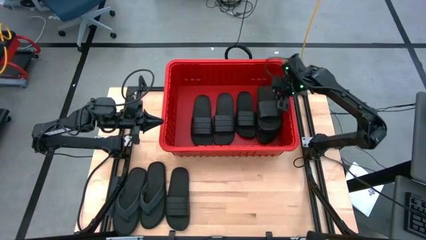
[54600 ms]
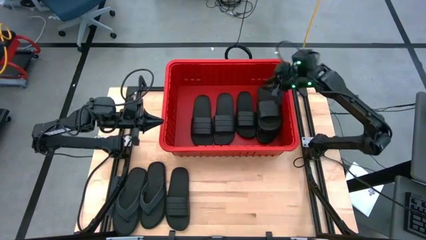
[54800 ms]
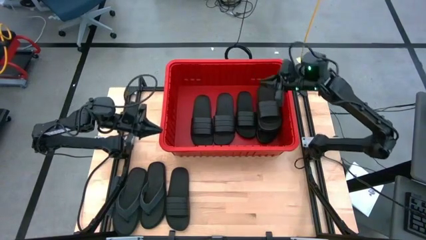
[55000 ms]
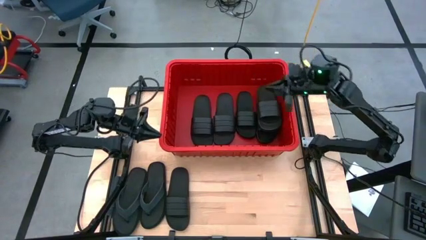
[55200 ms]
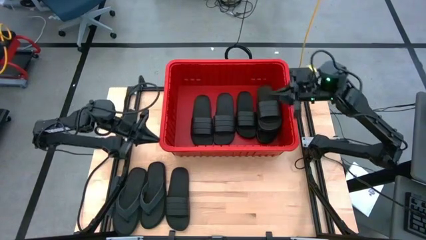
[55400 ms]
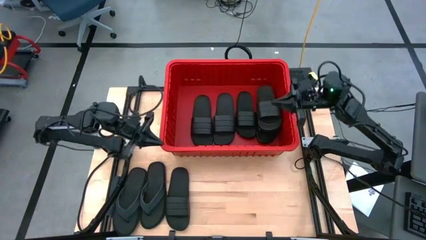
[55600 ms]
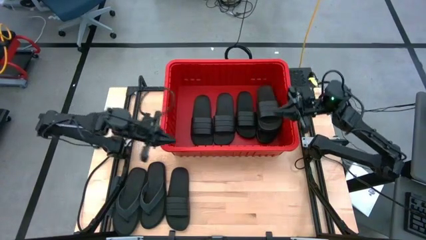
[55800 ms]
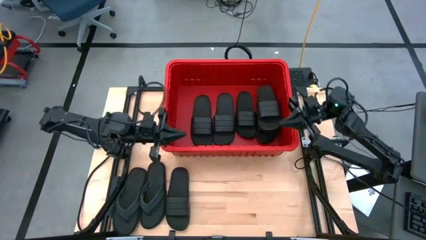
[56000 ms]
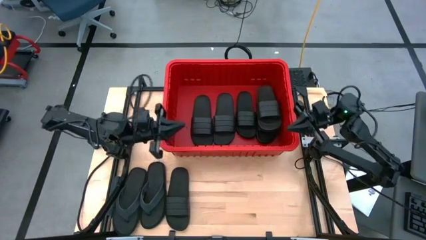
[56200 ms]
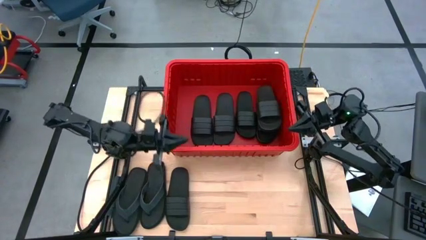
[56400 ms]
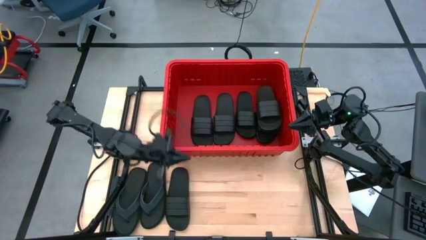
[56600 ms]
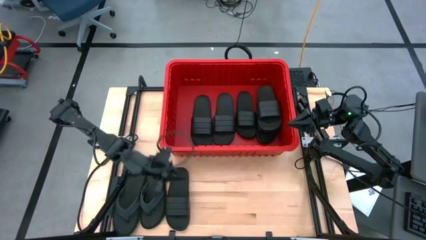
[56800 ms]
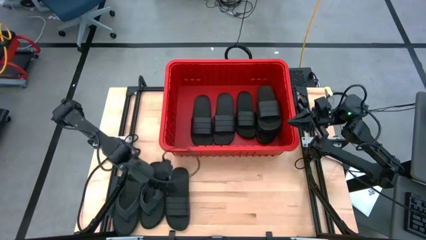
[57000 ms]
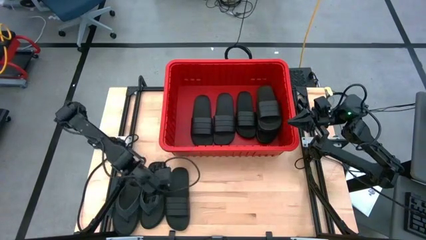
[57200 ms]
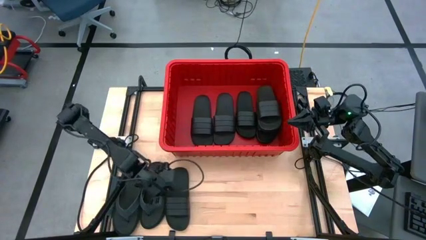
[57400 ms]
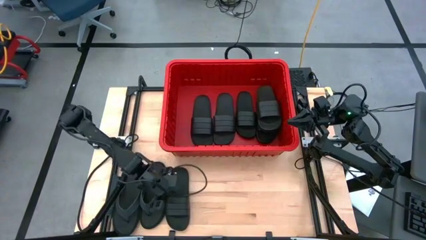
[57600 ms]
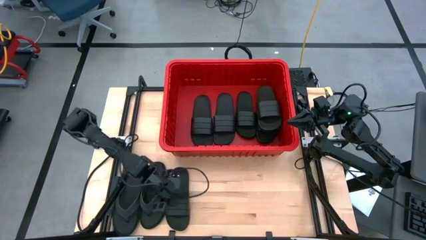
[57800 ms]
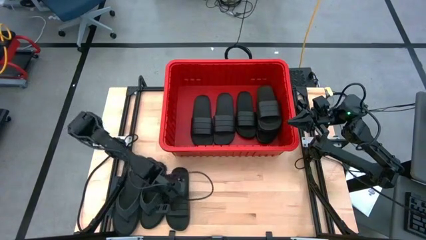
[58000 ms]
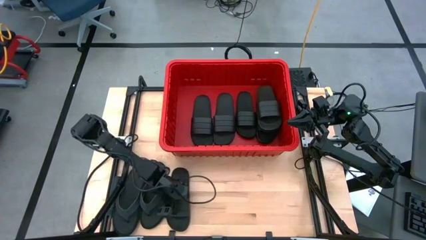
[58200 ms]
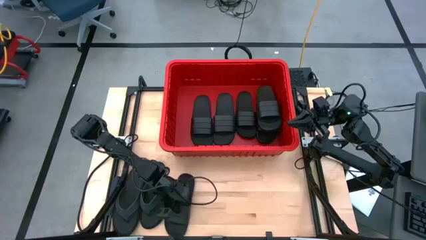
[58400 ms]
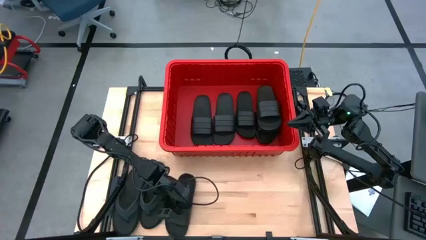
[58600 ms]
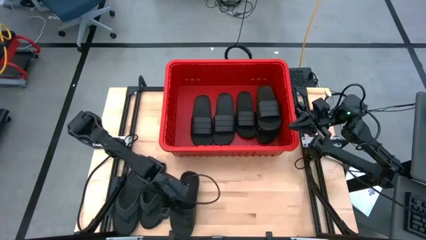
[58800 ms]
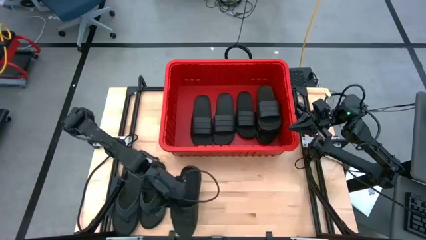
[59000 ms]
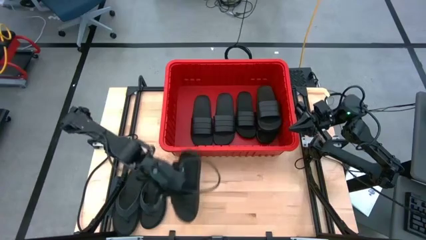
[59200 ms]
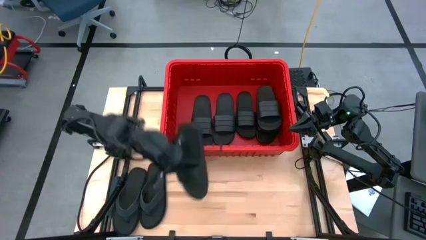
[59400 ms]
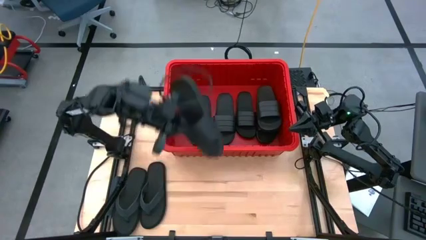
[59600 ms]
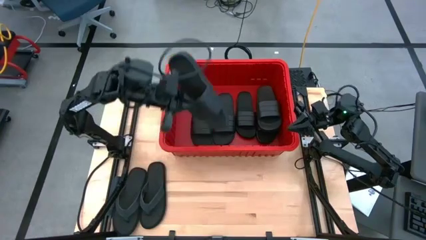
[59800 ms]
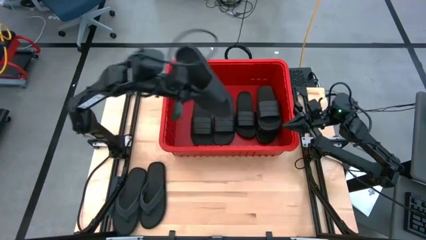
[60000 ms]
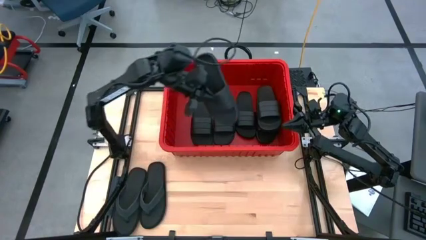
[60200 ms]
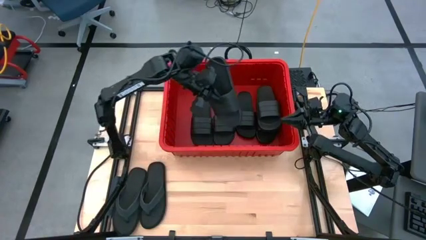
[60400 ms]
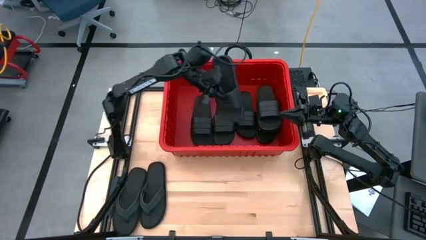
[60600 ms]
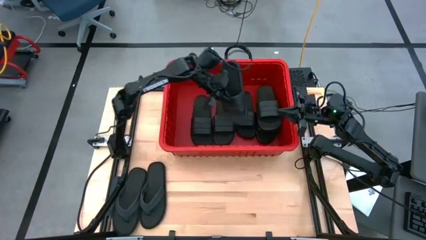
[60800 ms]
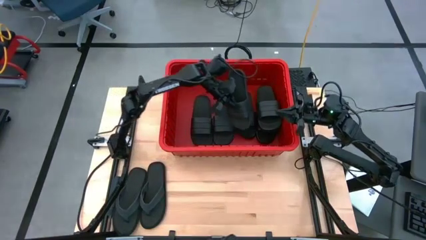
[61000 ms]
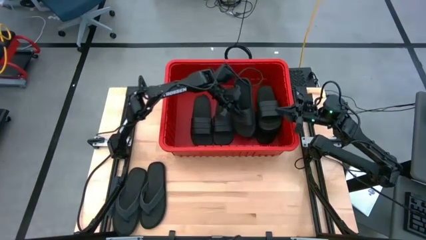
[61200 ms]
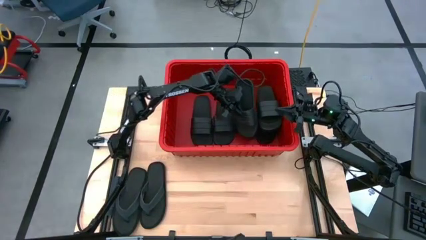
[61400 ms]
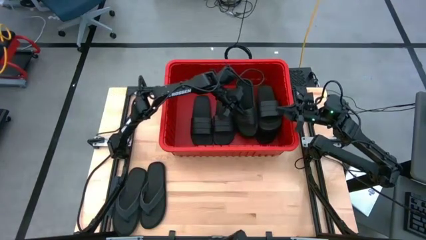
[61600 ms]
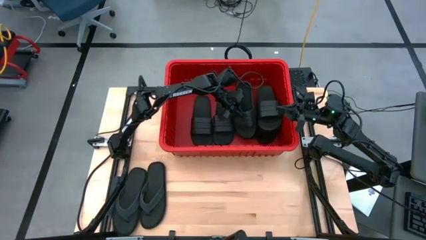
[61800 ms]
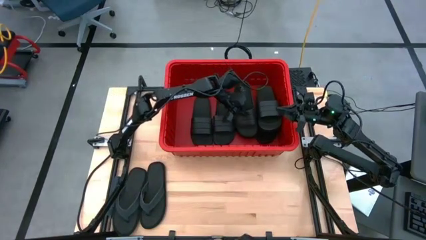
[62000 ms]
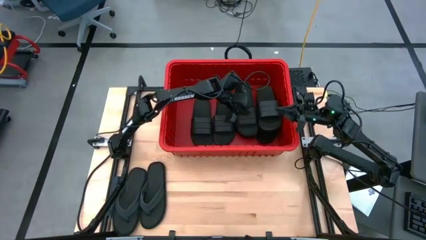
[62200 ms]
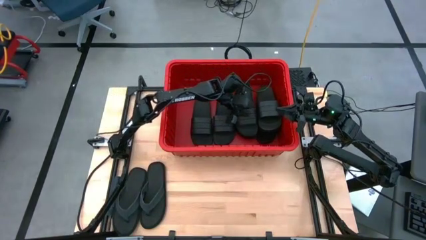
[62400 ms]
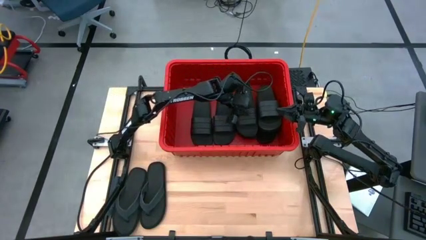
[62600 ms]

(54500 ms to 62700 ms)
Task: Pick and place slides into bin
Put the black slide into the red container

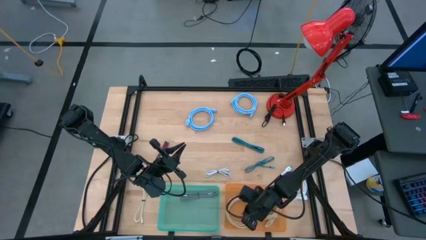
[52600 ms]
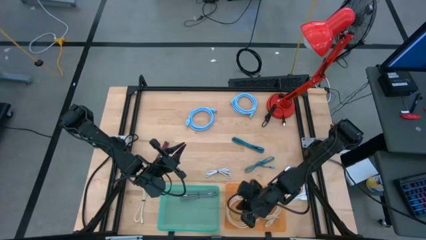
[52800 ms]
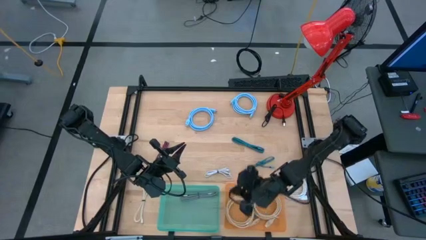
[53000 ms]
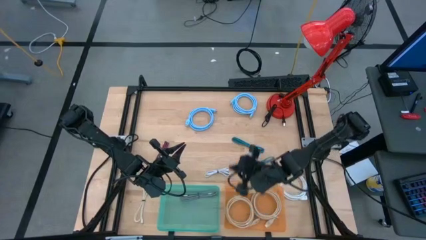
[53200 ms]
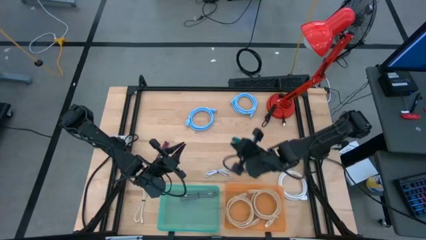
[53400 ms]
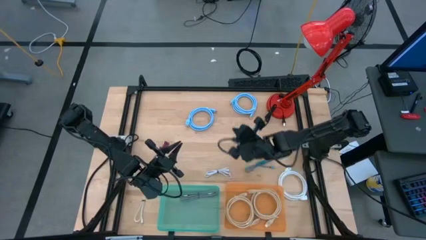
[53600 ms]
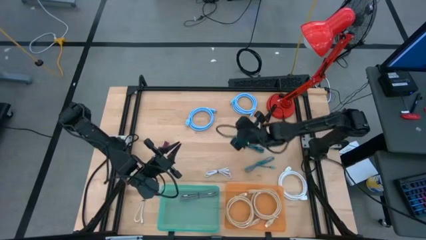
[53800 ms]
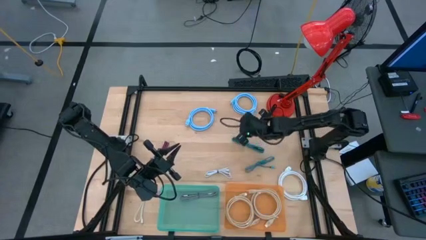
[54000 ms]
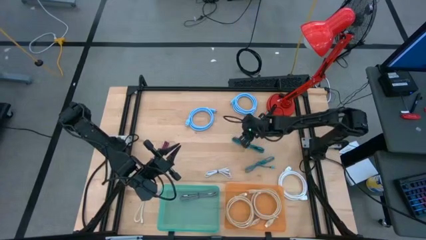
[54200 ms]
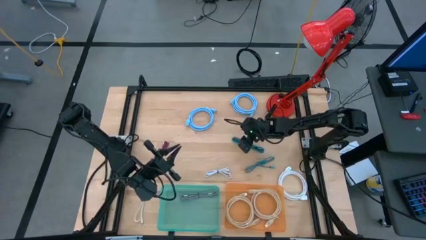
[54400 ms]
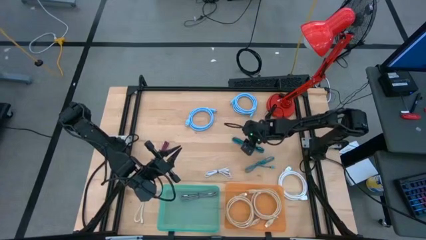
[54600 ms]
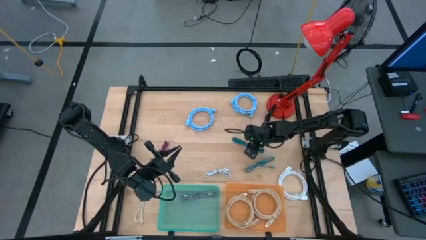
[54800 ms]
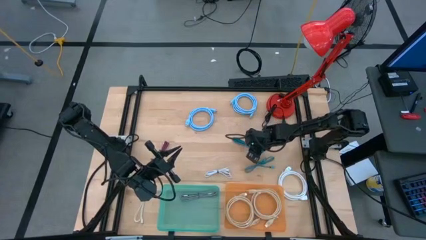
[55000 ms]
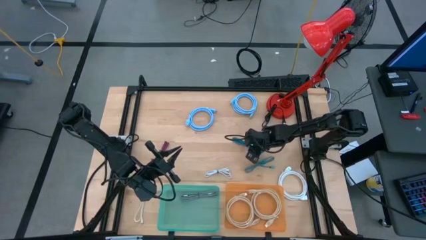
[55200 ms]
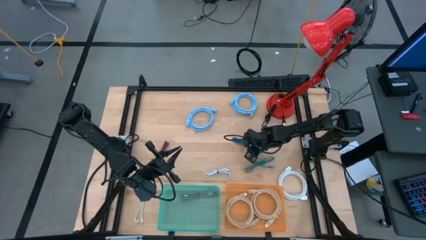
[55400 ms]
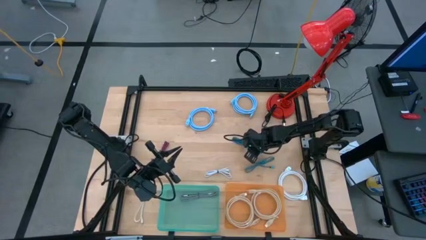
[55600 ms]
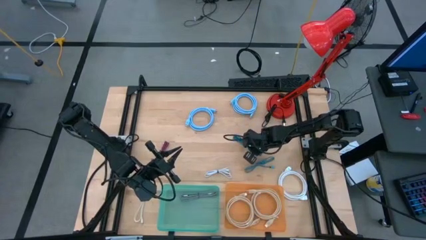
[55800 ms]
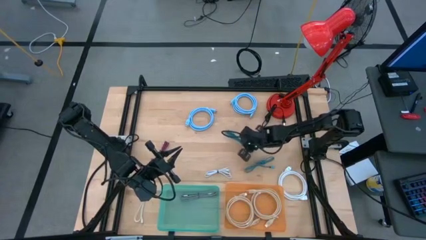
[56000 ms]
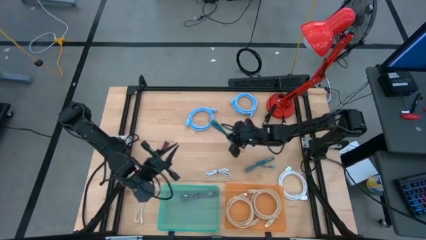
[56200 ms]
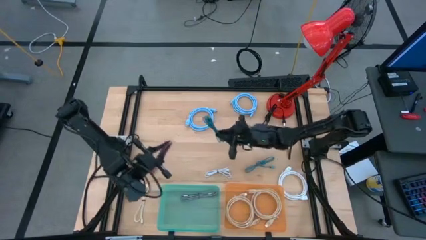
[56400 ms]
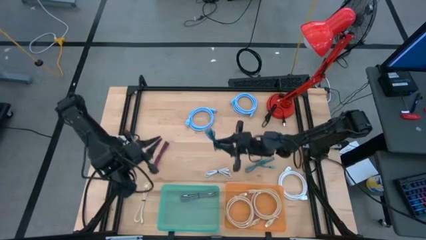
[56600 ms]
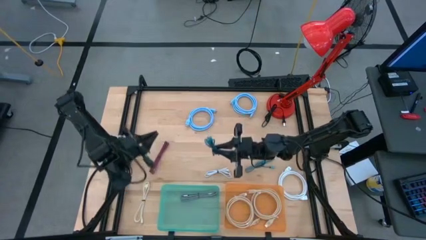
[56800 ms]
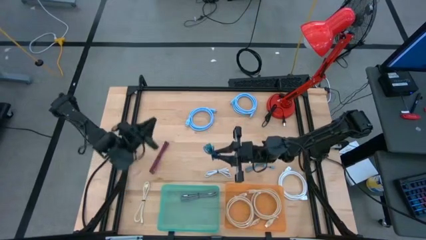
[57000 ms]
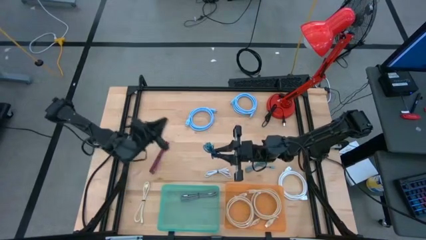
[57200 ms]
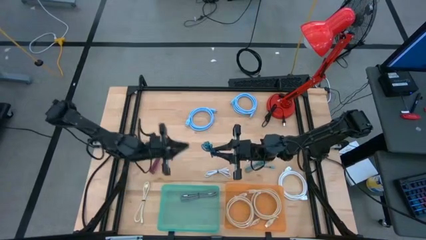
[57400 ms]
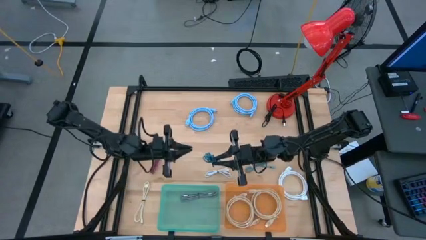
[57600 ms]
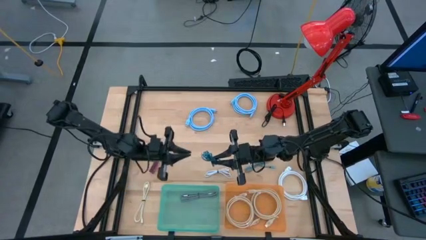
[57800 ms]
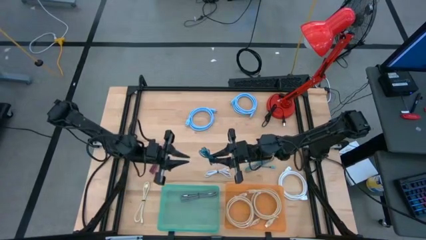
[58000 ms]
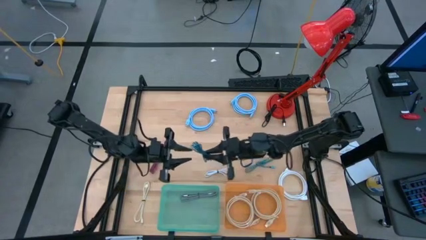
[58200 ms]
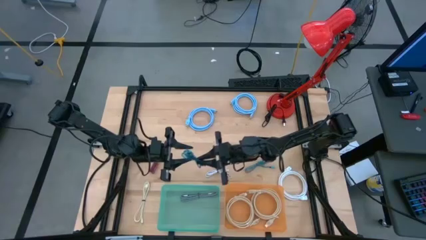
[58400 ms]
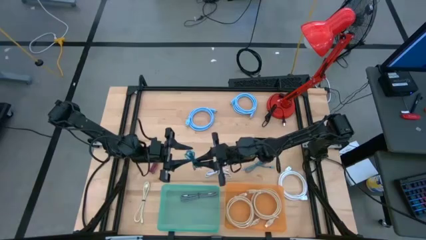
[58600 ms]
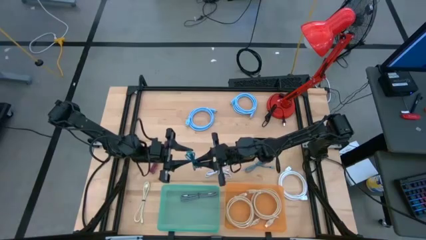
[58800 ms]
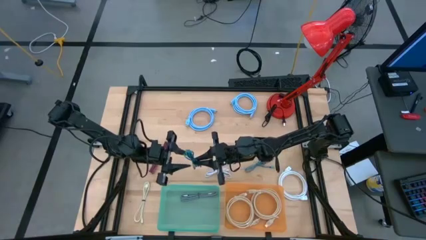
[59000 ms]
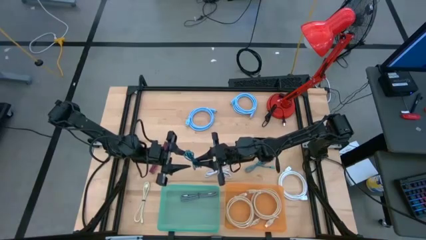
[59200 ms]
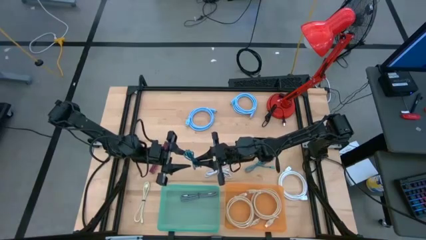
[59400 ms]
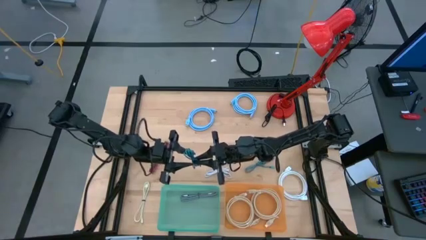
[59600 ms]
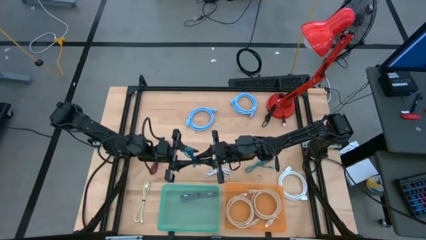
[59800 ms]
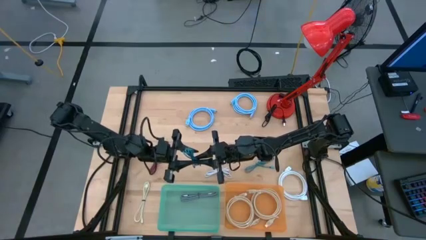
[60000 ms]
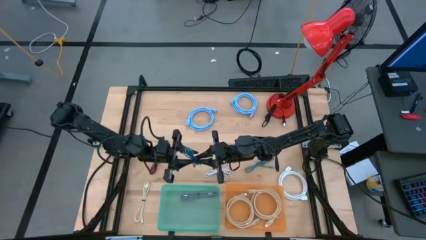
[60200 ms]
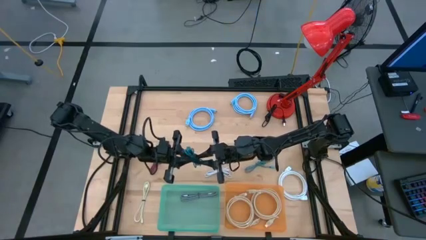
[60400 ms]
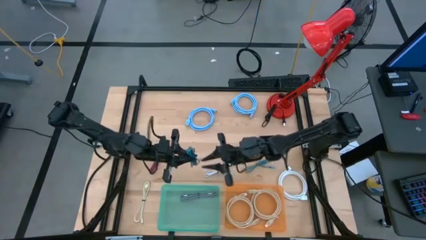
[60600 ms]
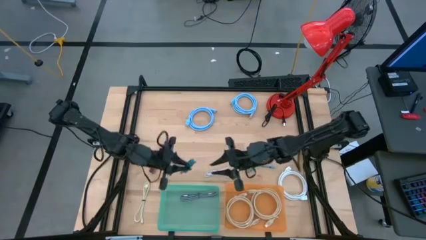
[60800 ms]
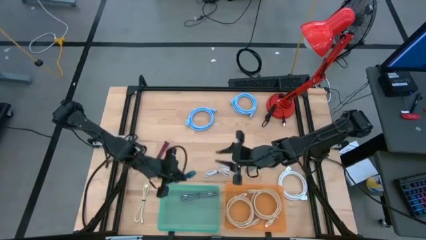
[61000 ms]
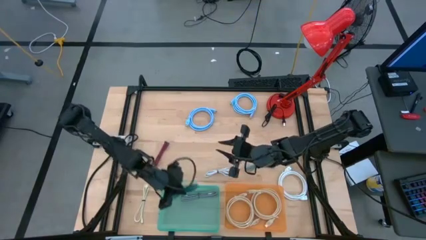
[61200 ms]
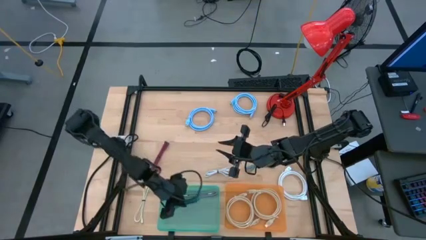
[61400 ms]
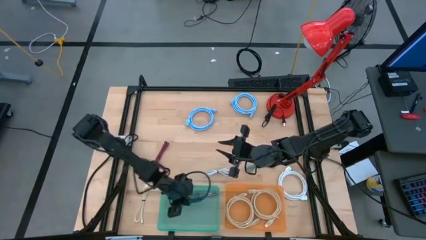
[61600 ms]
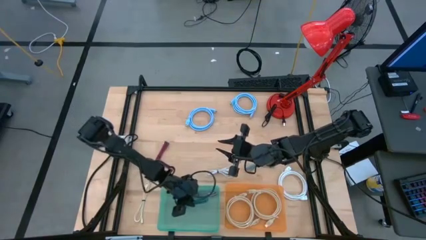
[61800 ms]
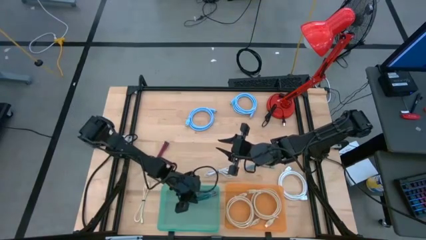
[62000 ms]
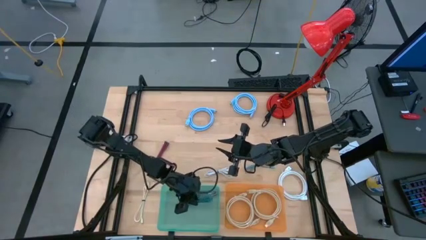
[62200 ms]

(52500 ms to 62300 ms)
Task: Pick & Place USB Port
Put the top blue charger cable into the green bin
